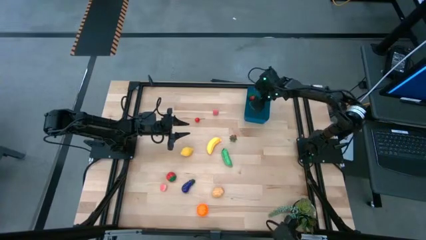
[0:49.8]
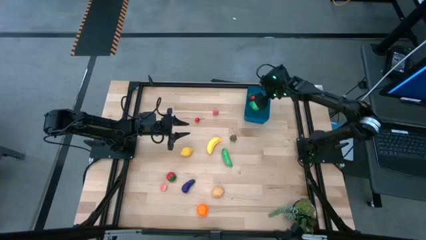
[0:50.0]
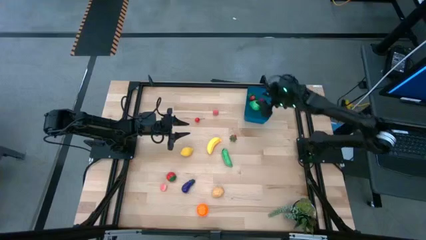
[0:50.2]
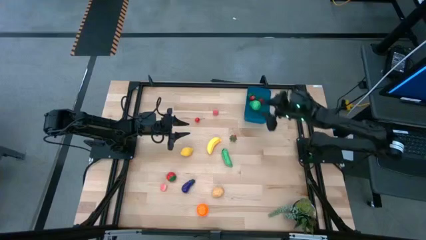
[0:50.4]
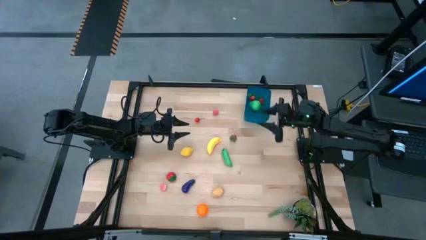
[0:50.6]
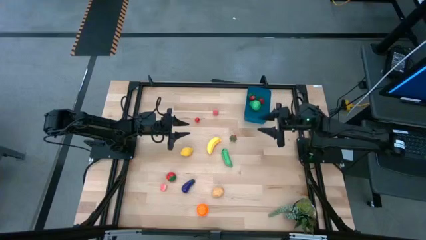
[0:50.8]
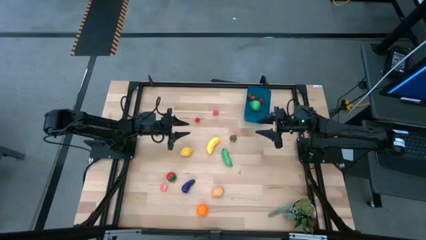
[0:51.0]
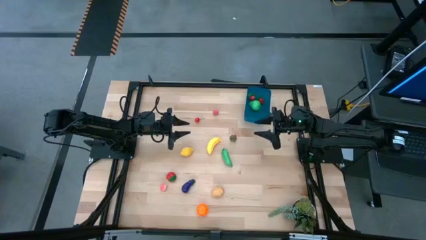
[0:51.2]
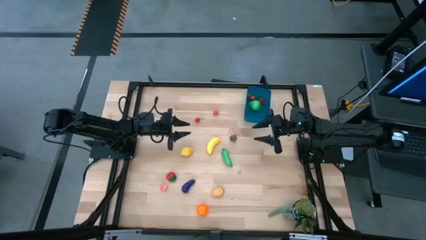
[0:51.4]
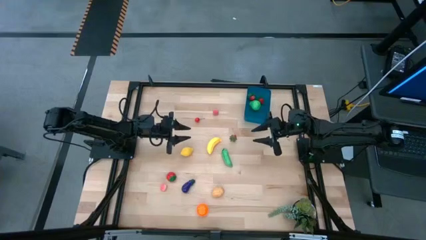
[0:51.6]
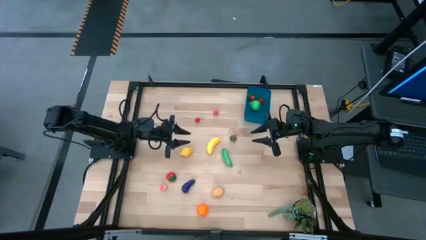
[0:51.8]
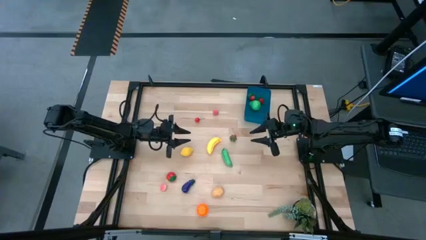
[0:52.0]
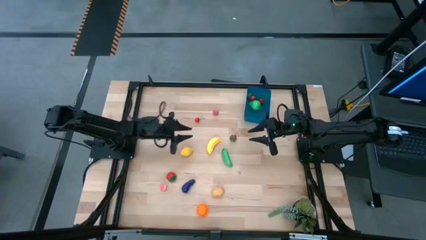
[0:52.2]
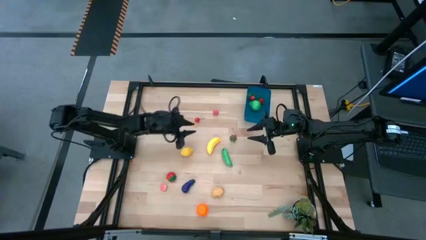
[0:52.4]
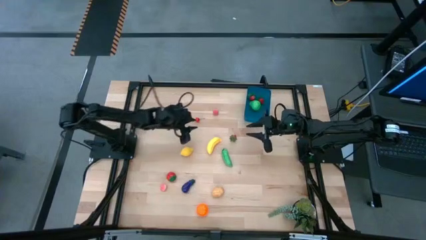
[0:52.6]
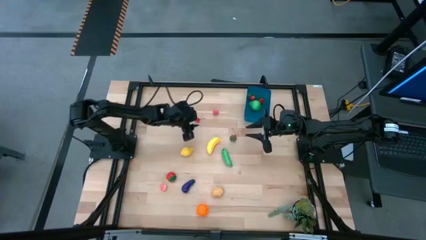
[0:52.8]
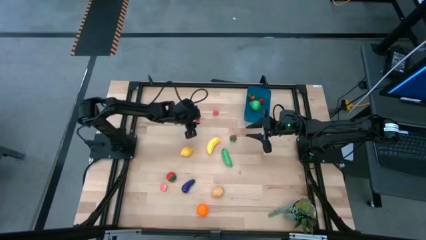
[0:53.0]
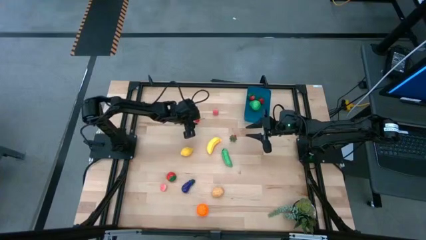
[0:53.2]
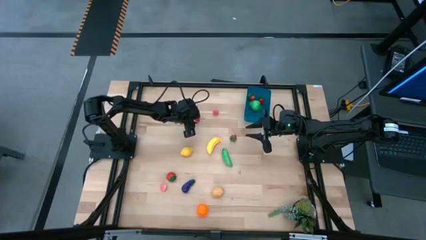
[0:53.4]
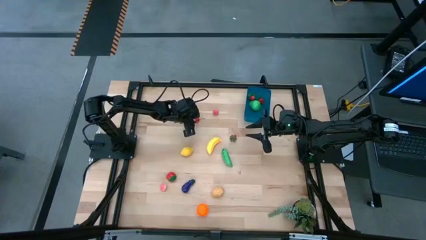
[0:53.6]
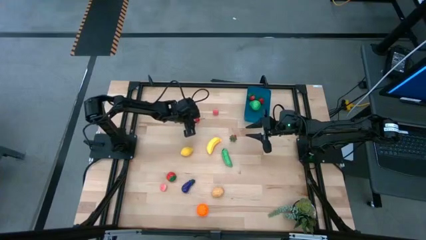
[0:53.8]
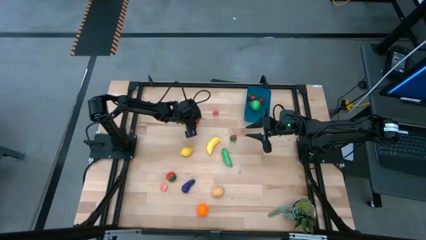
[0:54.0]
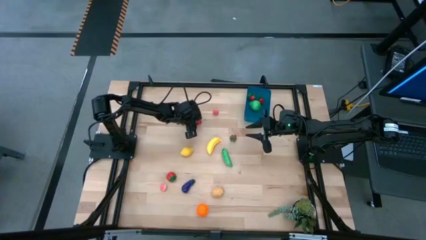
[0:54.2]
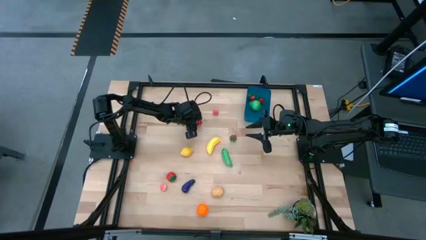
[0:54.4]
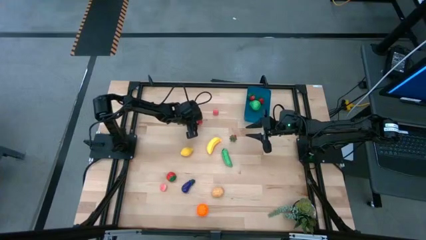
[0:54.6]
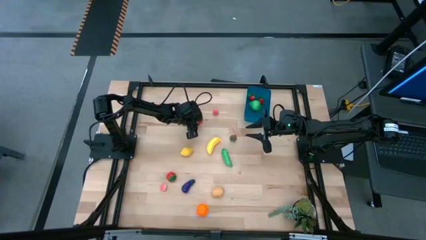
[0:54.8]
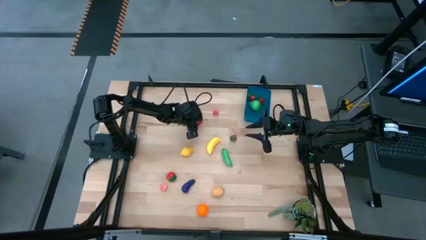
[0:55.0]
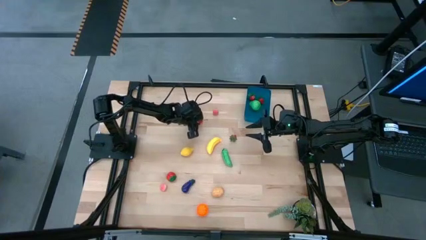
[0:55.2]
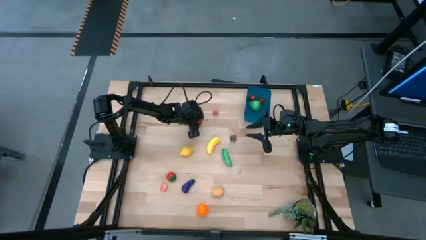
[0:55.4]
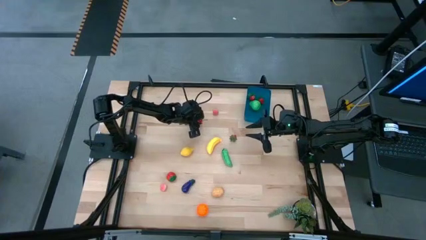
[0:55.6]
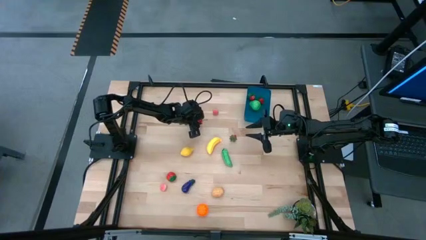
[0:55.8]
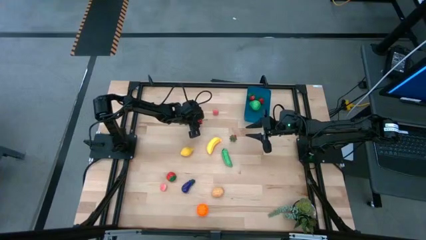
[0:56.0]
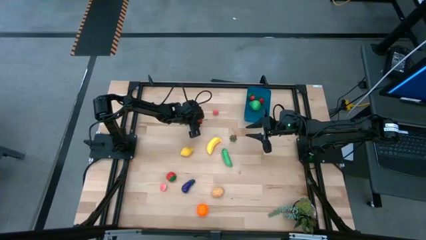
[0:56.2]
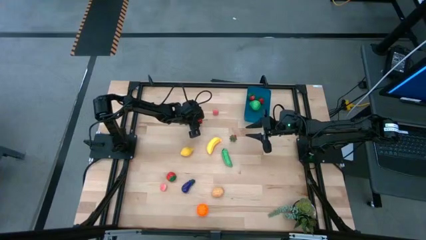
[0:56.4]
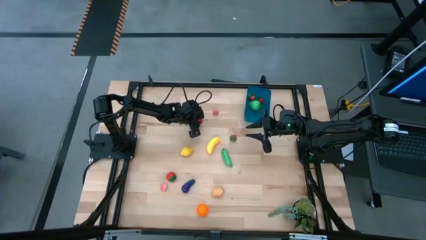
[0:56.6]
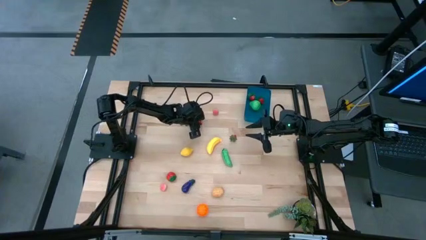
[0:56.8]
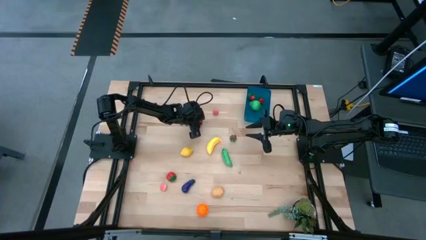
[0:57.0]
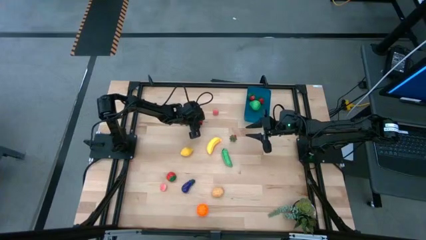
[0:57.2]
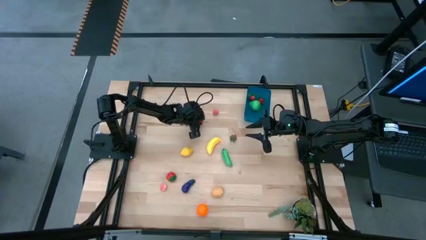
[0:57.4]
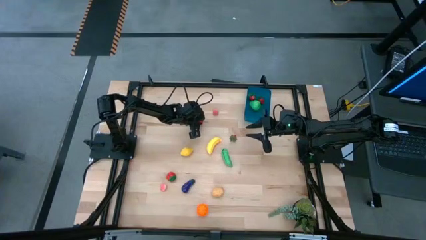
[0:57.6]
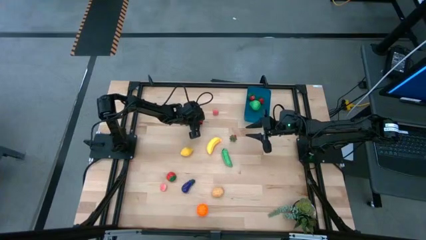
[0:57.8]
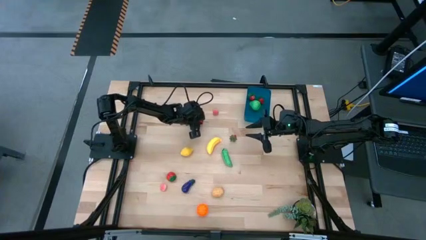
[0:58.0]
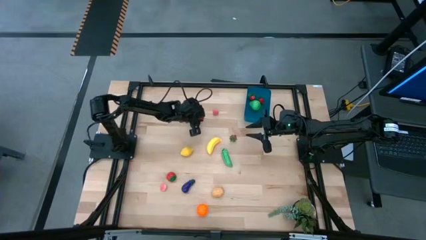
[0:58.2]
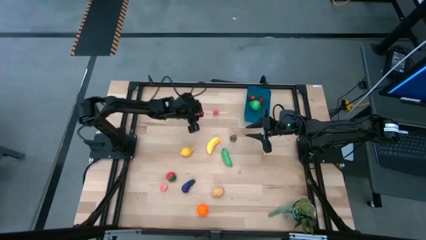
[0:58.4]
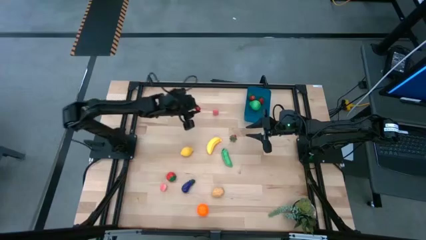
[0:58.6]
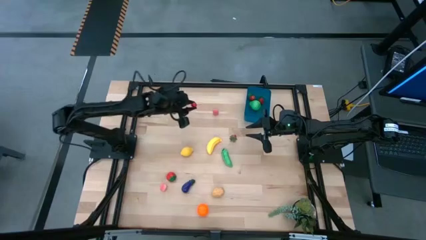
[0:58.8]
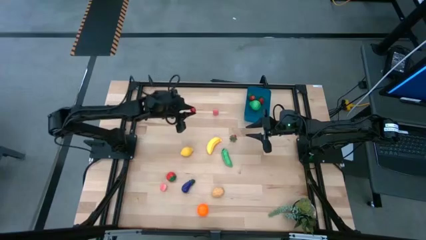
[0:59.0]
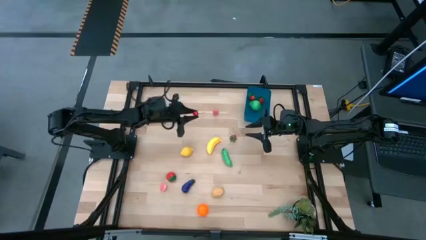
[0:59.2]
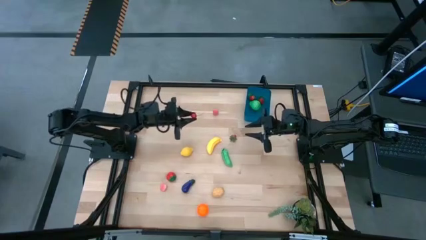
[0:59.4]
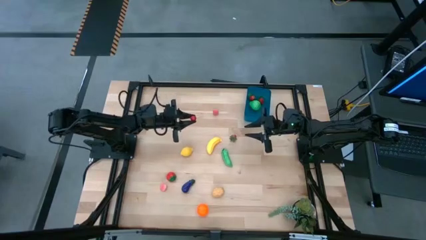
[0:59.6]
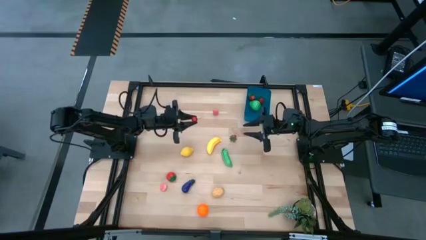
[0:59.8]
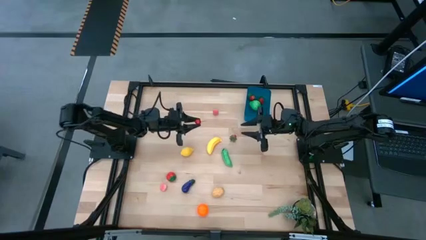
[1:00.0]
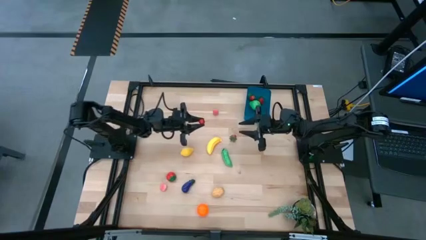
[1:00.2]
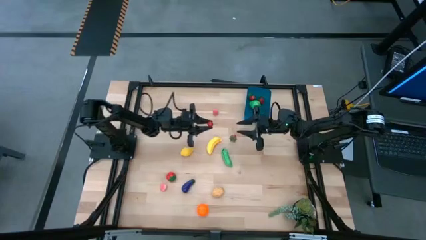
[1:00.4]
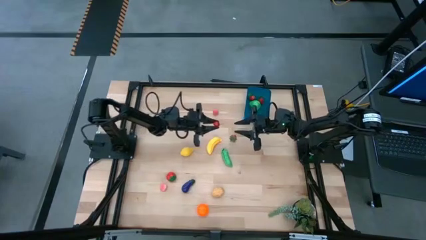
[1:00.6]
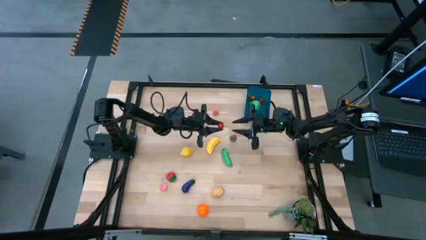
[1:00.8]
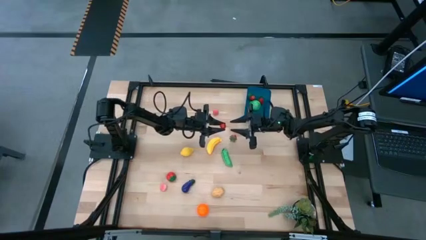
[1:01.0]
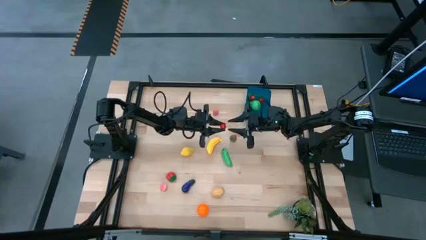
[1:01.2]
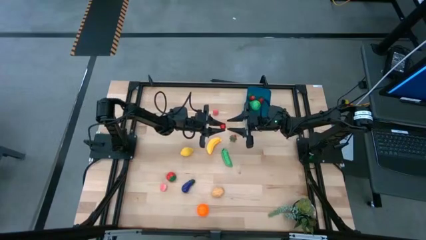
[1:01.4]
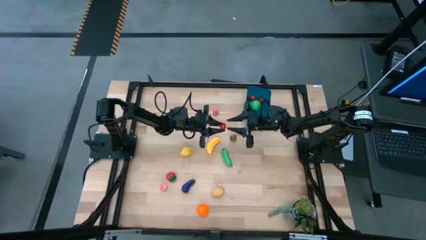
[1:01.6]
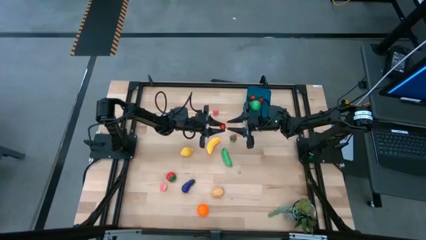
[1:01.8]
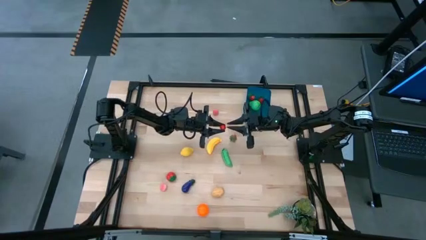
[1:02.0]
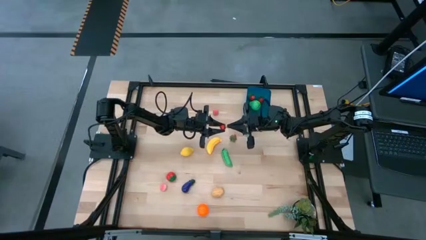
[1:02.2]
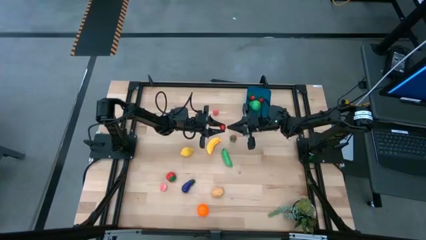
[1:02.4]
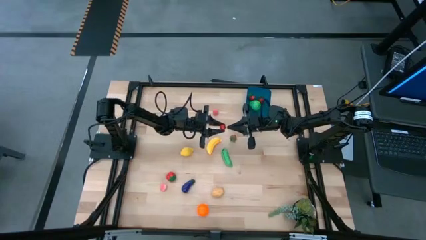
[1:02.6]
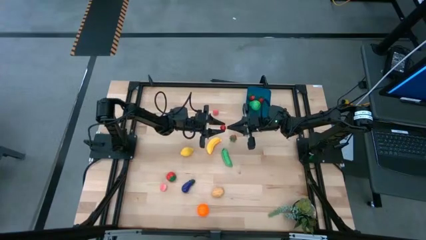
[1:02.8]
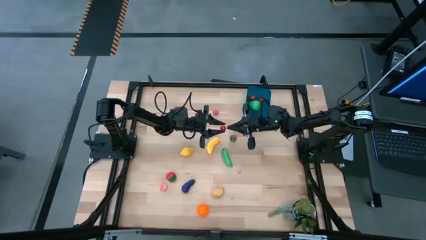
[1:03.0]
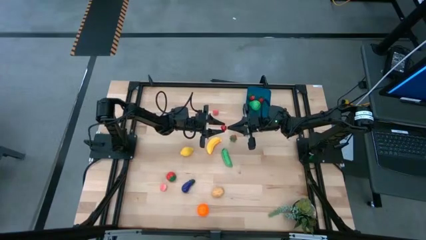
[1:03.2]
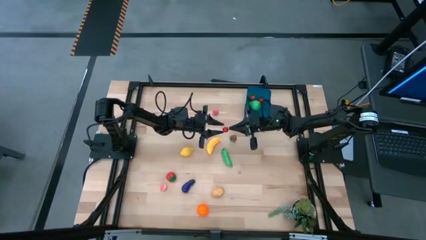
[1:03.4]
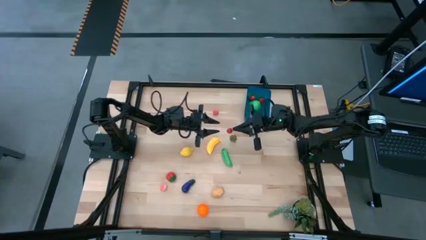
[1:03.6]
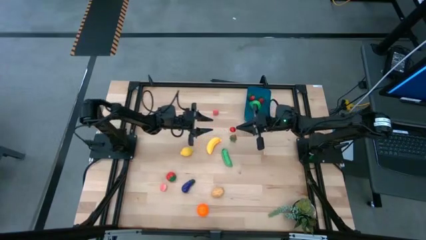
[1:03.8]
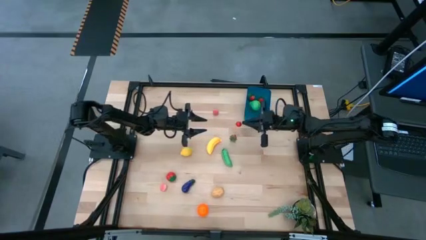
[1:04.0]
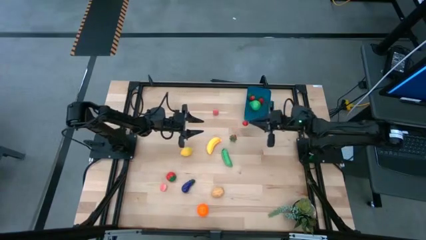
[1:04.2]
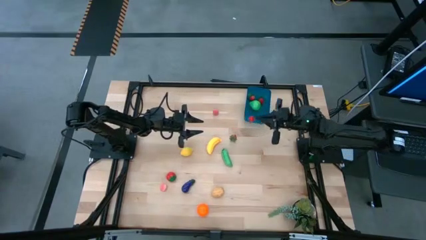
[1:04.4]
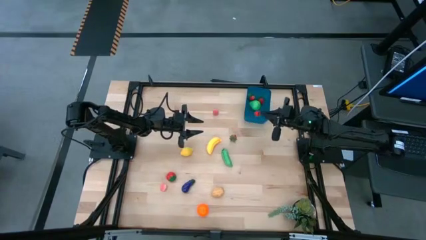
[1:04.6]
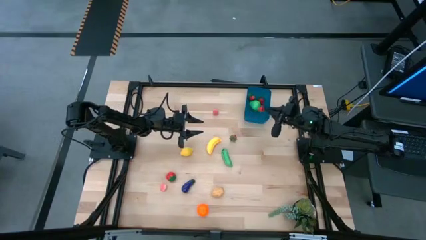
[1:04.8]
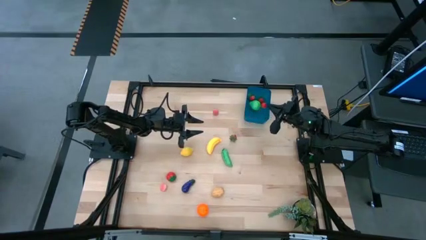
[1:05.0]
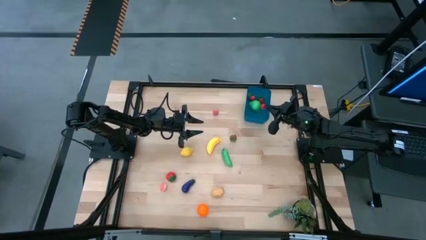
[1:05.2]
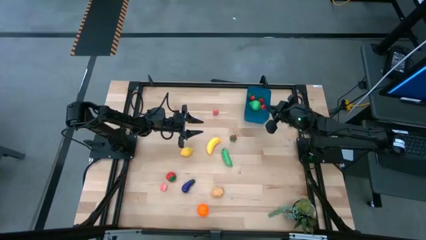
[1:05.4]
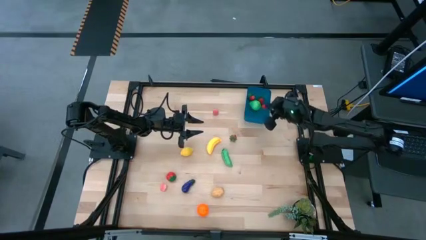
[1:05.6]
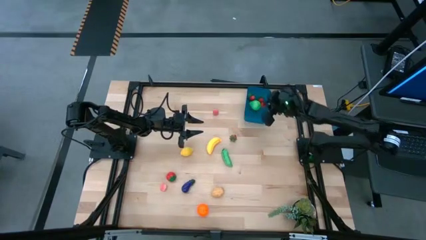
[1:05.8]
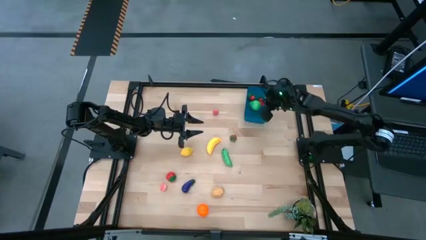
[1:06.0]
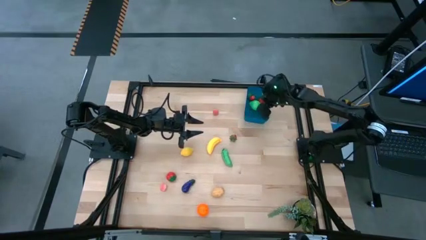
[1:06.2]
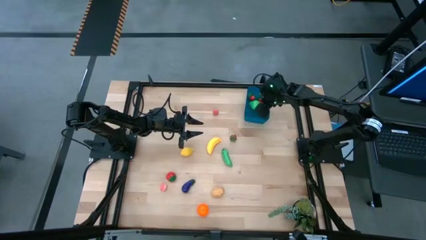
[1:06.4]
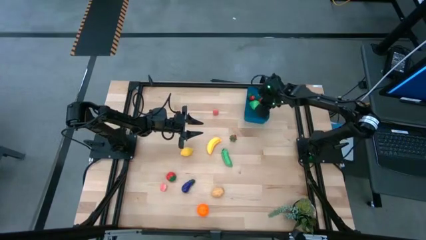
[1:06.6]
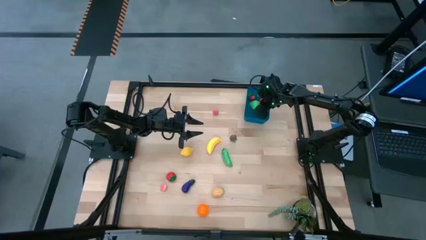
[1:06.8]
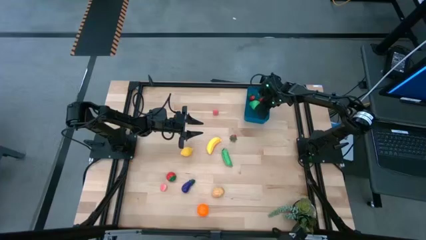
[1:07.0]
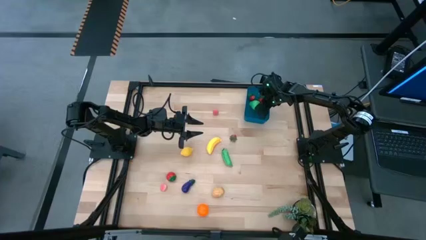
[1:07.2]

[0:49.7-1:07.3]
Task: Pick and placing Produce into tupperware
Put the red cherry into the blue bin
